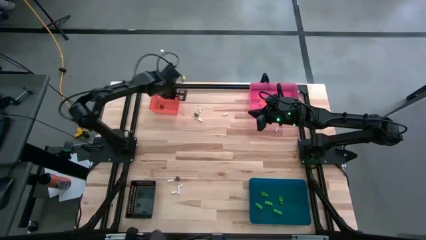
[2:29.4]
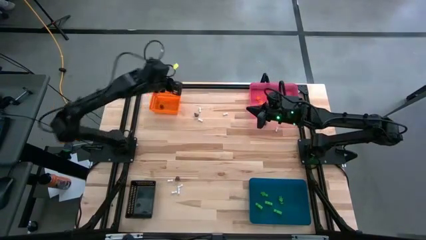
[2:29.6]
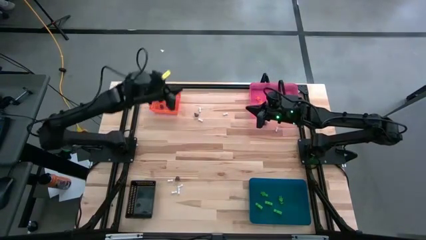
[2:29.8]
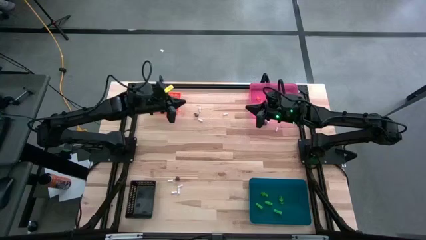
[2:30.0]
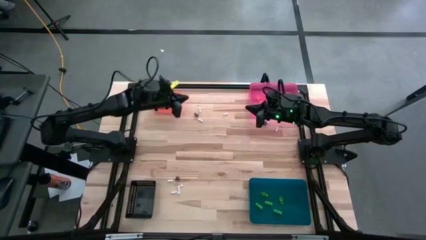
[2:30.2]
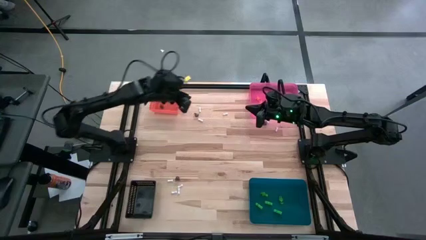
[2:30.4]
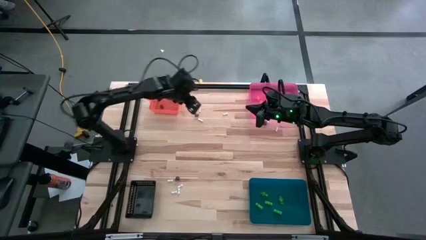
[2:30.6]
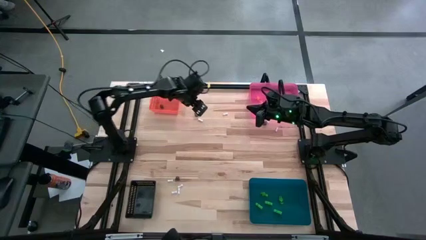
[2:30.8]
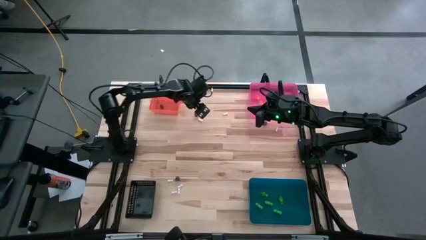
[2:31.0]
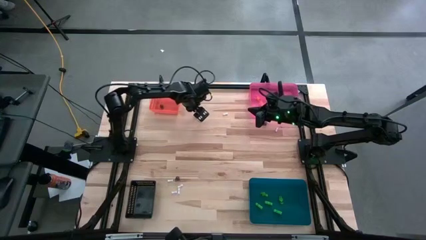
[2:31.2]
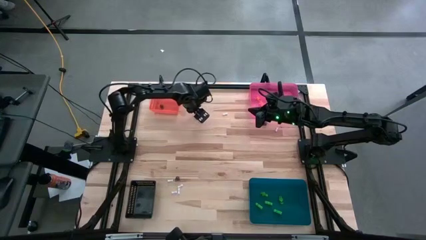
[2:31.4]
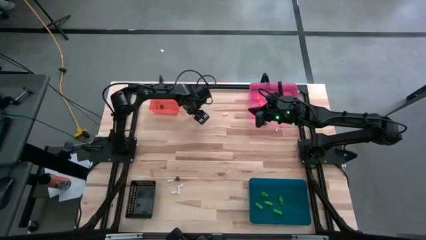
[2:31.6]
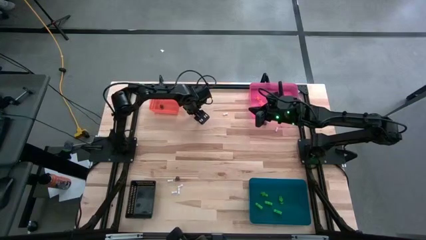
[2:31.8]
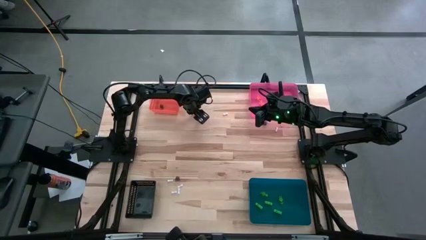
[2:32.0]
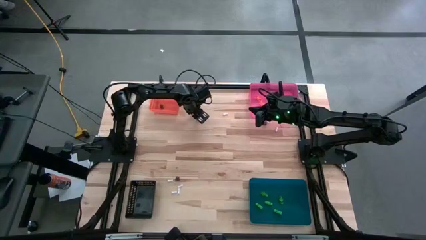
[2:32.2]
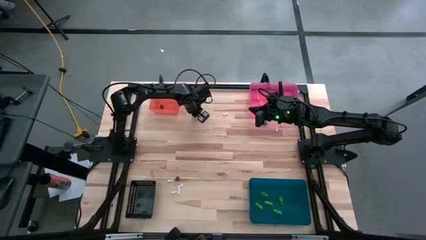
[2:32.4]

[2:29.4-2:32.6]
Task: Sort Halloween decoration
Put the top left black skull toy into the orange bin

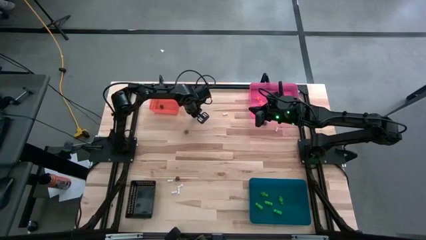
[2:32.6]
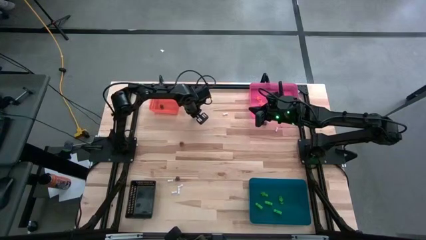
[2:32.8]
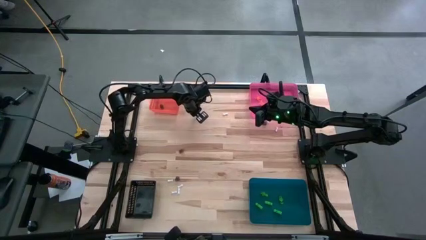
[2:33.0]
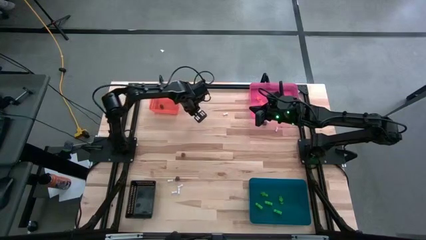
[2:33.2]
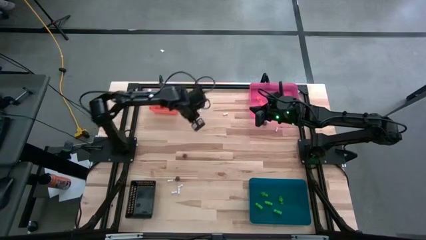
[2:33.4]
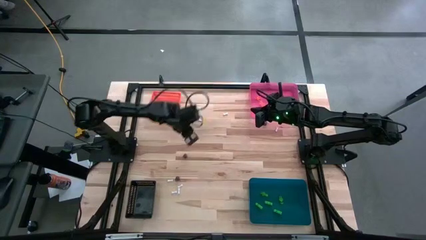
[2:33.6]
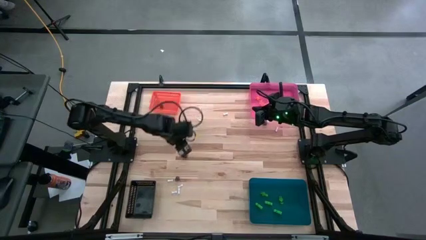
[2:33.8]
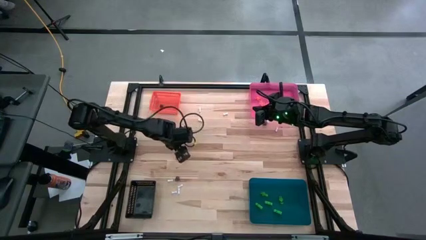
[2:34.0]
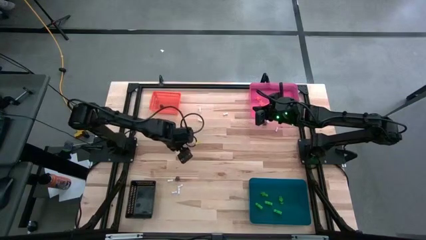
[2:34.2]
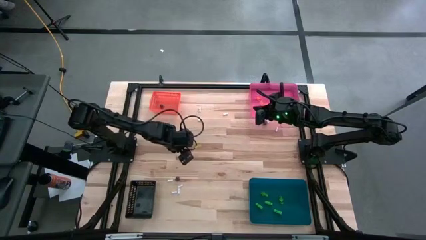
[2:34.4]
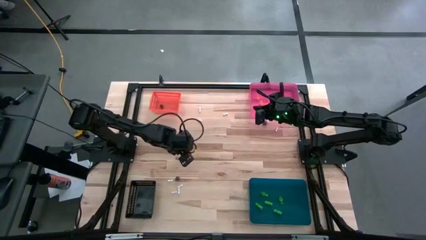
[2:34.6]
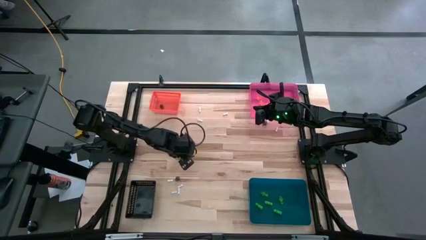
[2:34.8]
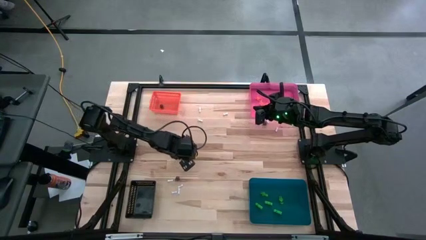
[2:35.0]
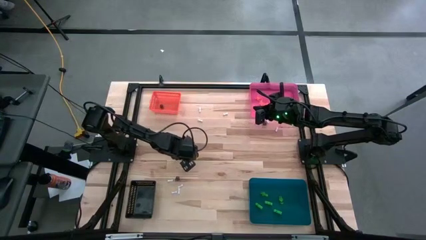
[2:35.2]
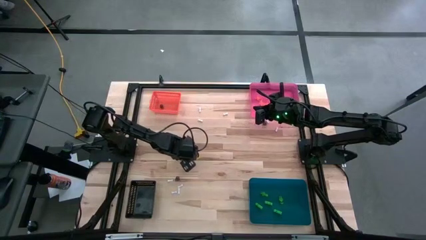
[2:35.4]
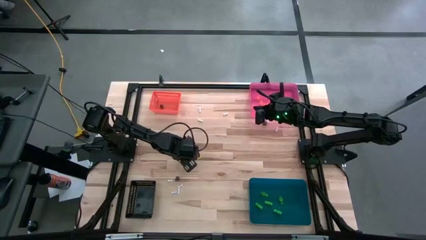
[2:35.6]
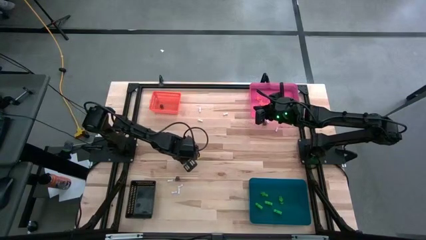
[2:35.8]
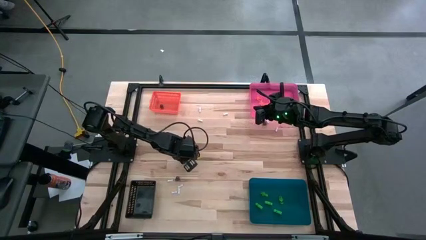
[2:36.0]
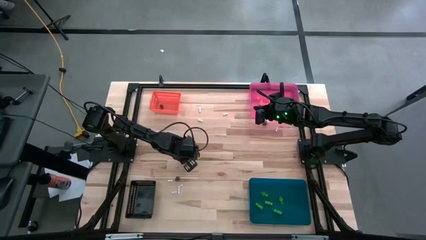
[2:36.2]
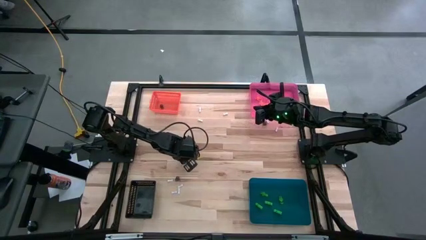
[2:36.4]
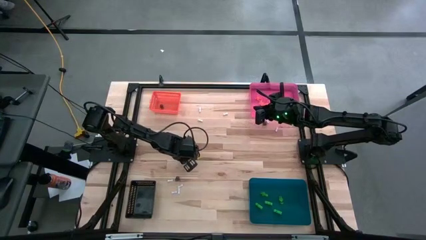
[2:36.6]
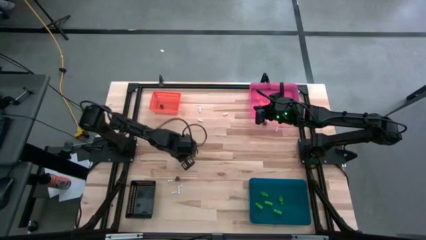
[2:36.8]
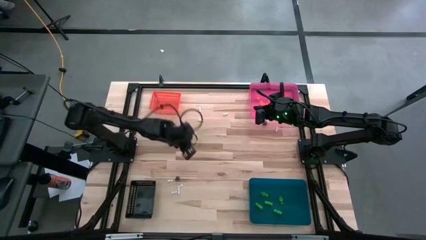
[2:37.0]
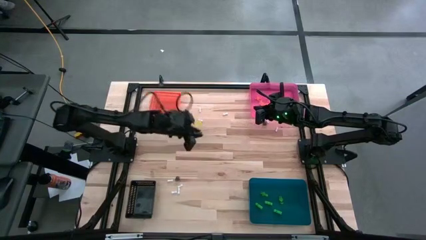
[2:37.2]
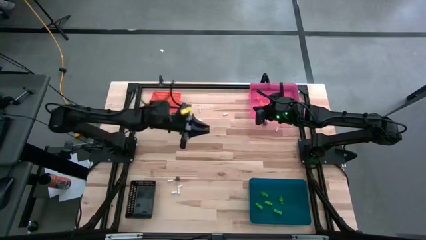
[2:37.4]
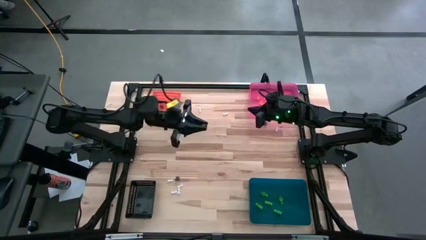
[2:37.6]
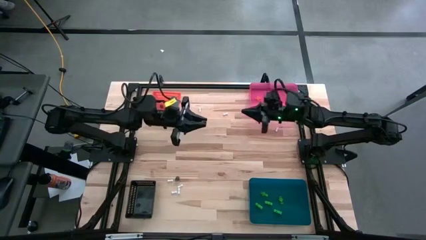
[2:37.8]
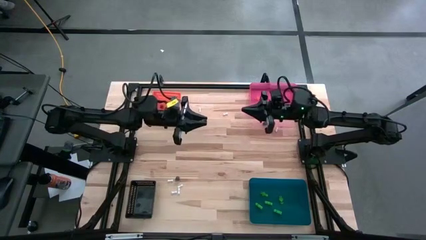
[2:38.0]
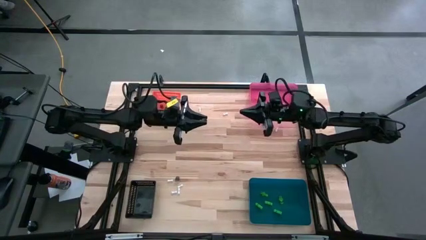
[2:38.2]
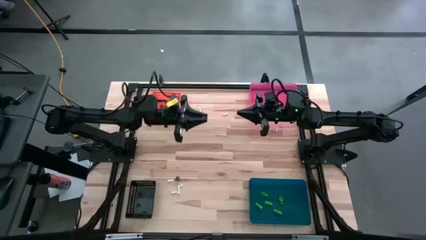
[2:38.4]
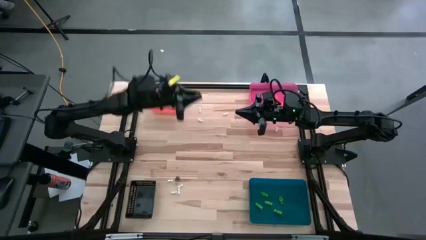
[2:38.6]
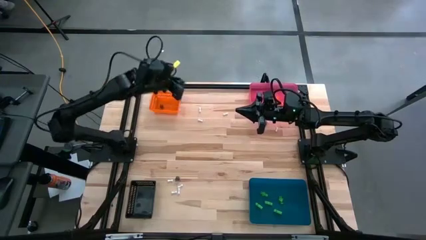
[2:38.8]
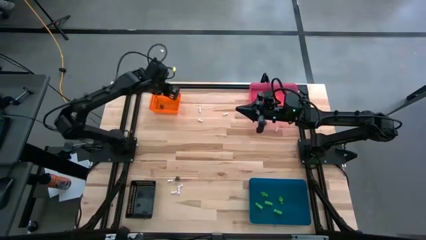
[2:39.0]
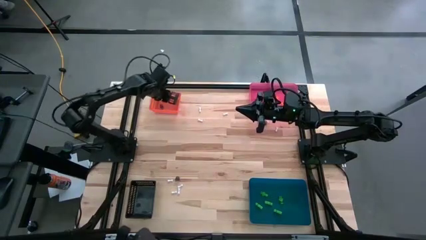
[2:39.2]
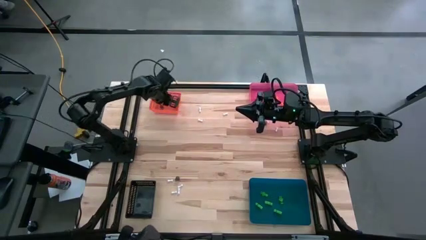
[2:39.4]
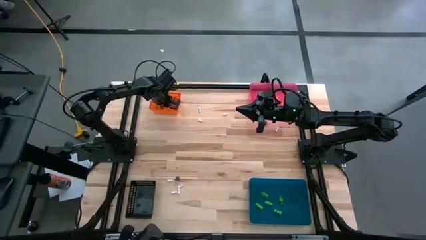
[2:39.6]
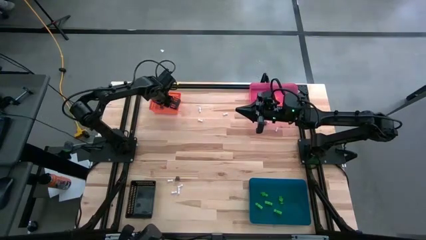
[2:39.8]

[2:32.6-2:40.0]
Put the top left black skull toy into the orange bin

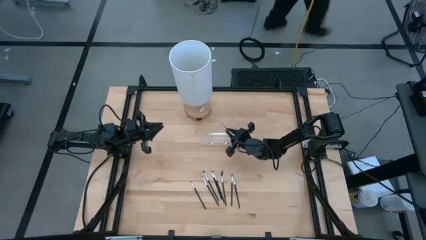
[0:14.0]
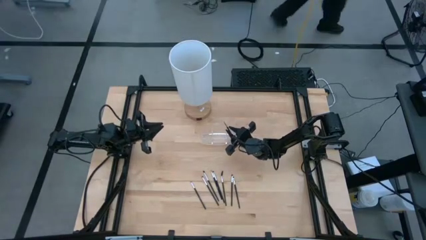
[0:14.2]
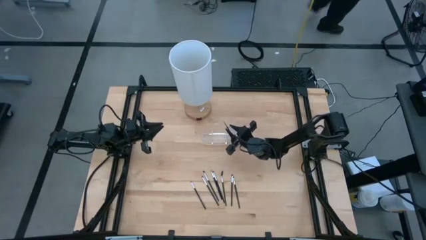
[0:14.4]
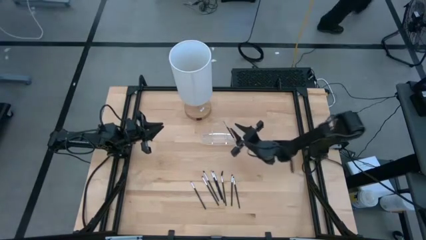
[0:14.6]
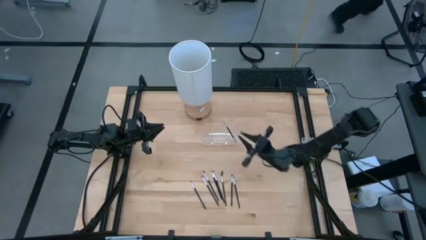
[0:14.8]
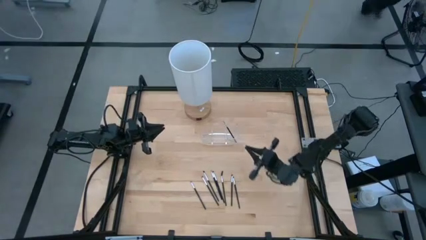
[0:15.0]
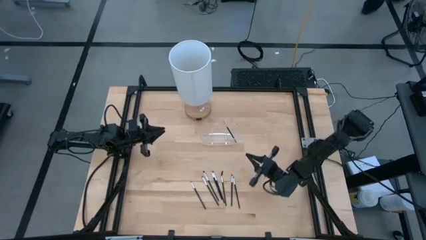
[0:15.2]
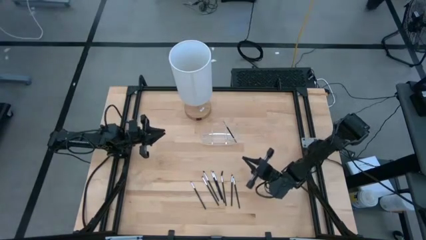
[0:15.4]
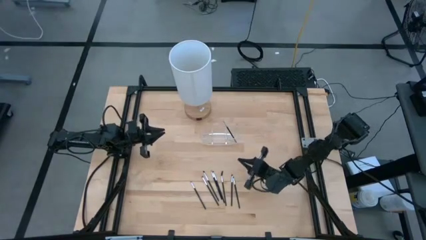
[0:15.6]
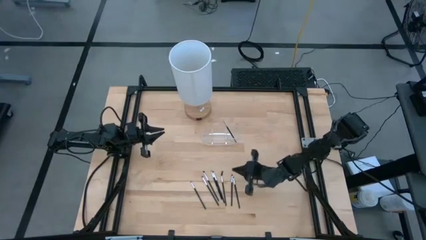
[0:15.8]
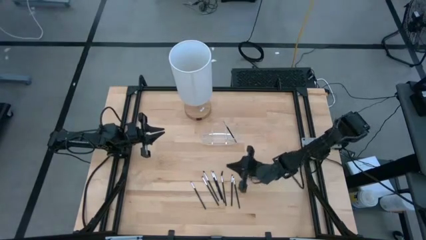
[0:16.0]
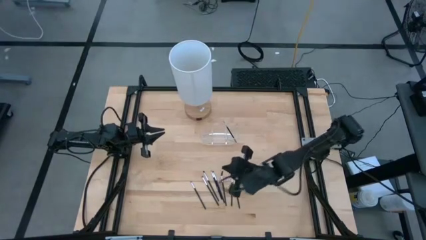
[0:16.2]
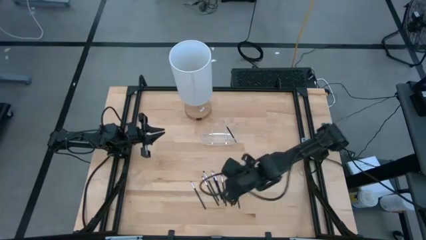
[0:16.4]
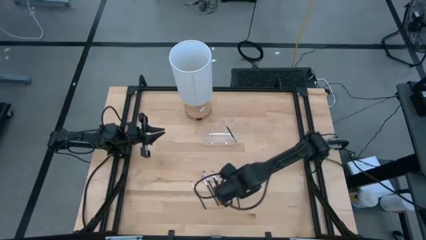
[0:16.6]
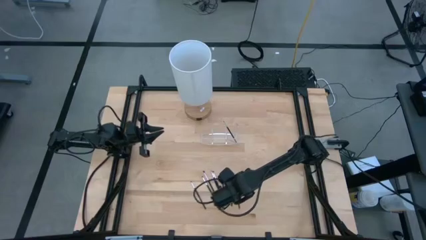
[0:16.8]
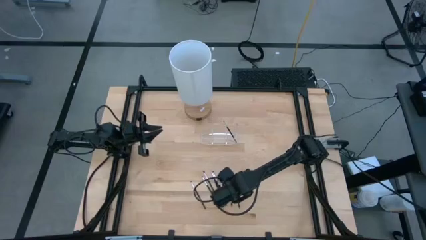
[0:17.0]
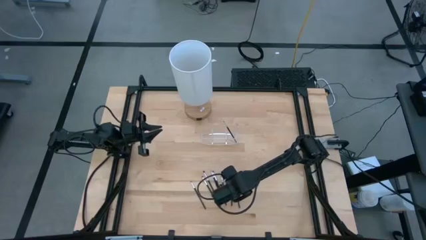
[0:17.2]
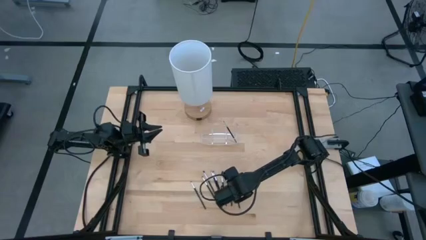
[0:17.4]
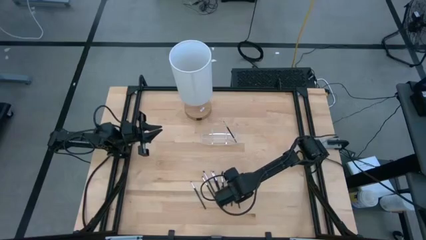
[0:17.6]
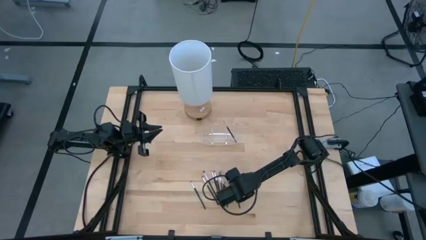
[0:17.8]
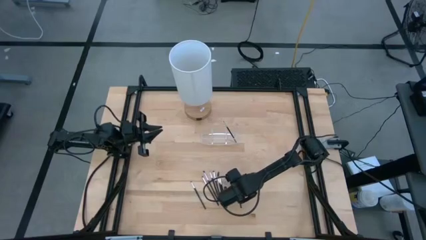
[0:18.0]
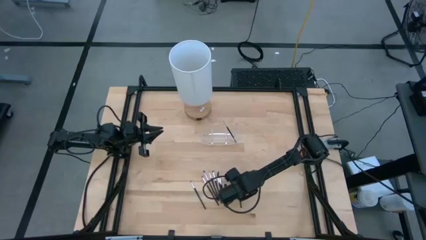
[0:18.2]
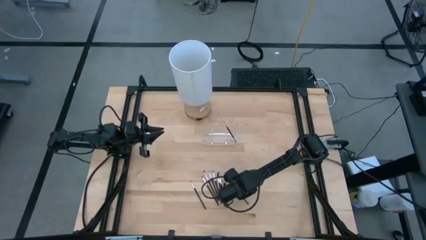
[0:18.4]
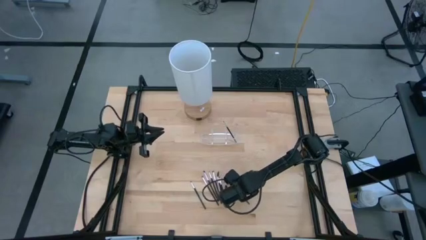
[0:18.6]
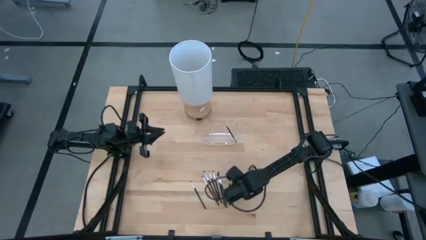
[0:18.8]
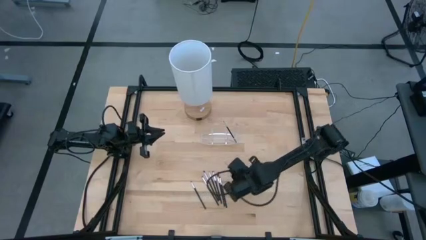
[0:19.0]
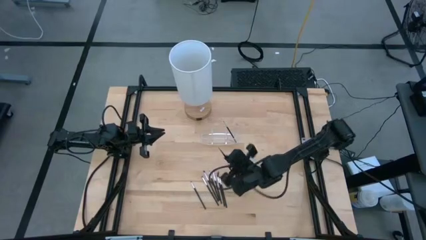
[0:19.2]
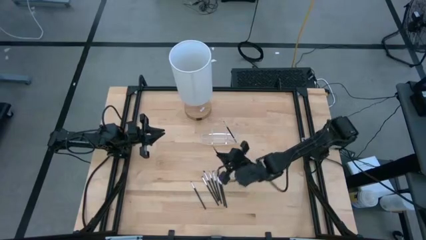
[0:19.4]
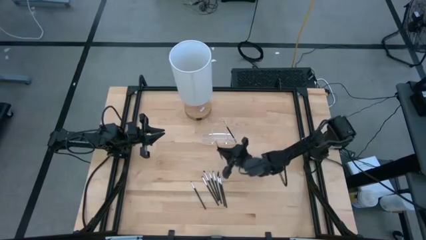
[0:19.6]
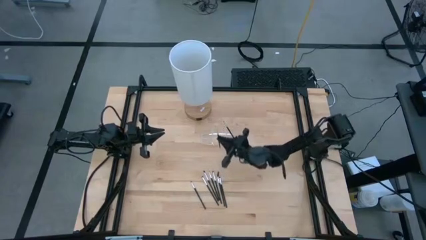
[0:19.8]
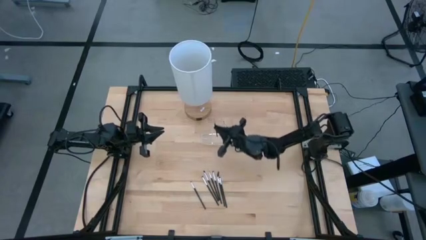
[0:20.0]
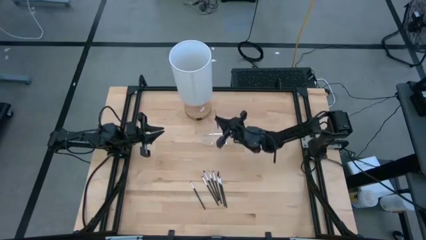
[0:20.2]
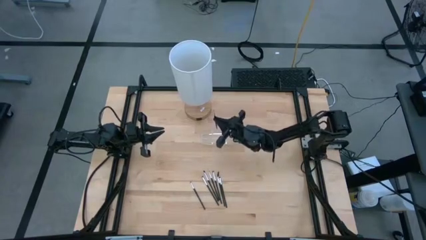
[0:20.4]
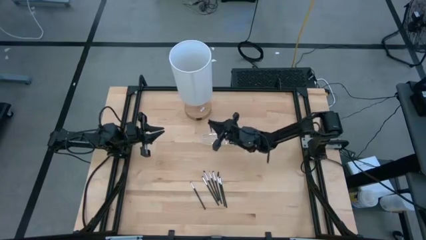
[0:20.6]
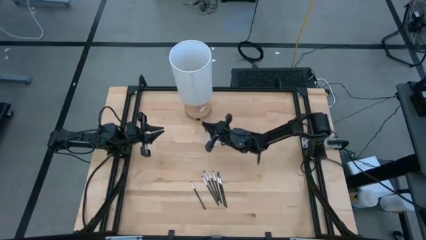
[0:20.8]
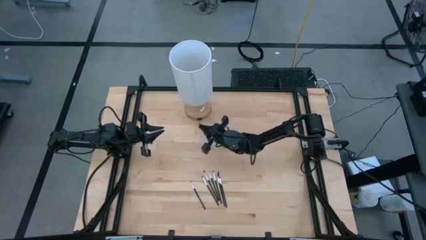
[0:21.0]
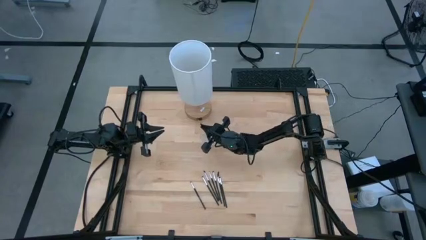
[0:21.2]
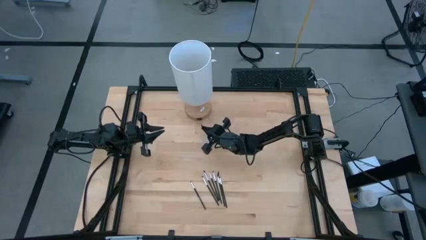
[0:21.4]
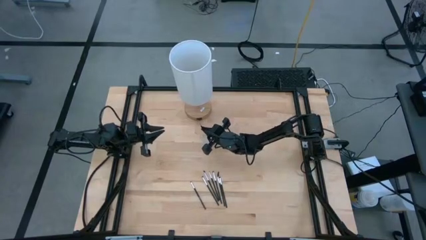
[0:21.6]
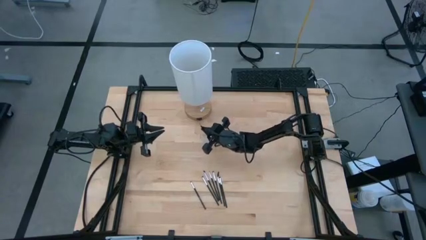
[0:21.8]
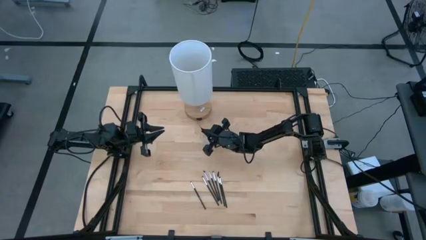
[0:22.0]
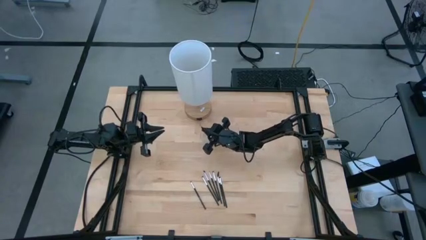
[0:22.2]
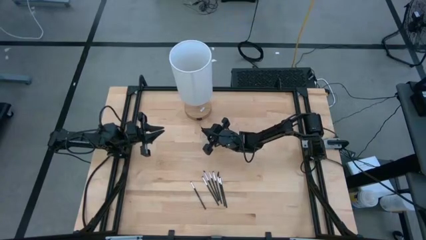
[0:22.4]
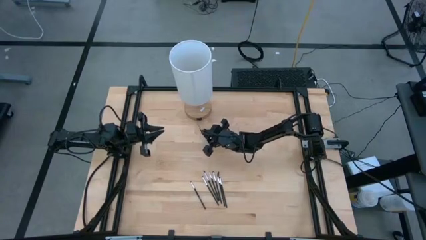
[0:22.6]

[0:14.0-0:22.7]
Task: Pick & Place Makeup Supplies
Put the makeup brush into the transparent organizer
